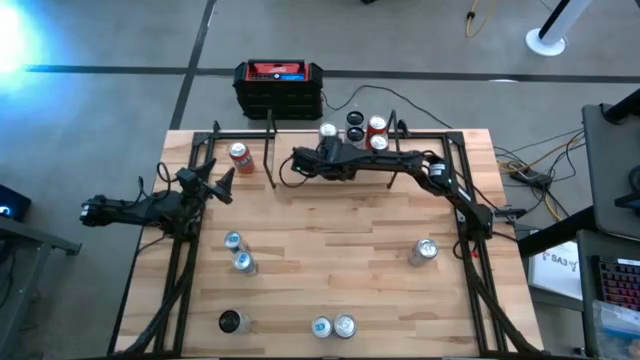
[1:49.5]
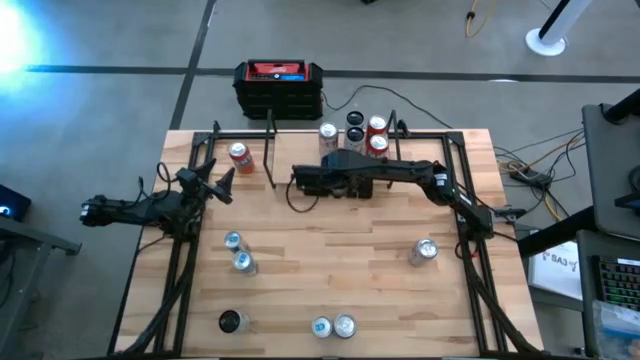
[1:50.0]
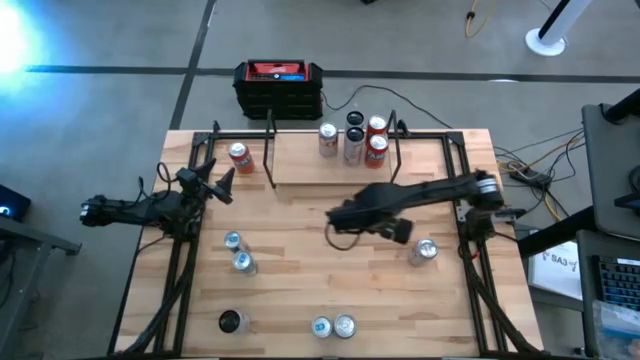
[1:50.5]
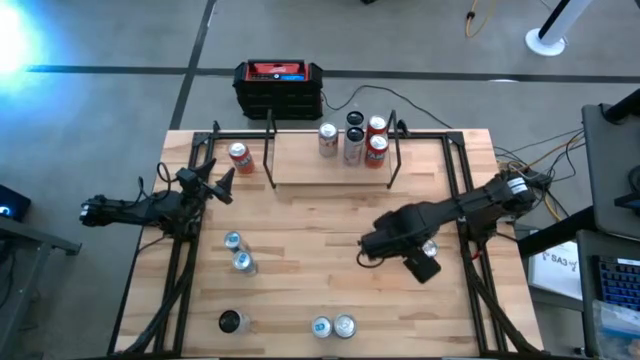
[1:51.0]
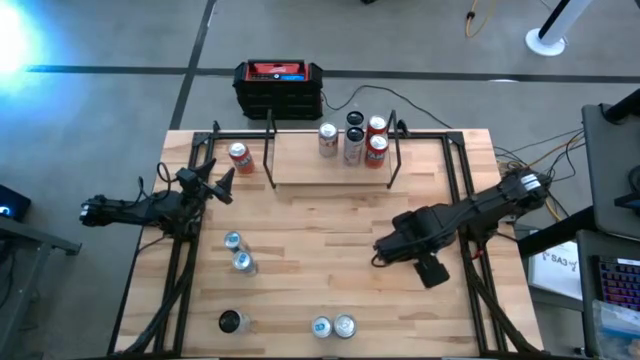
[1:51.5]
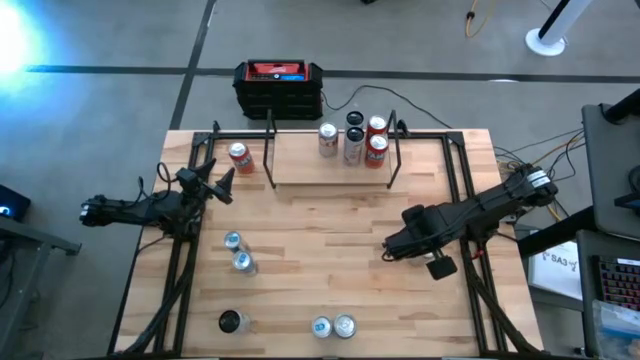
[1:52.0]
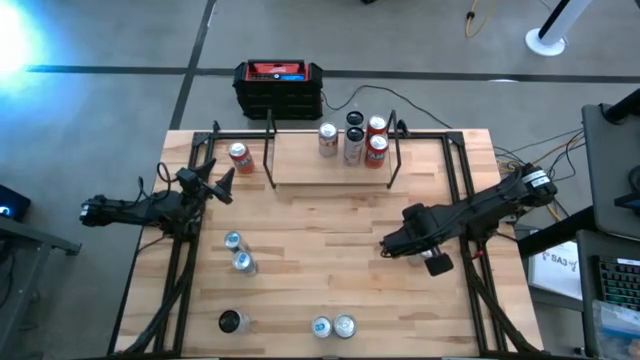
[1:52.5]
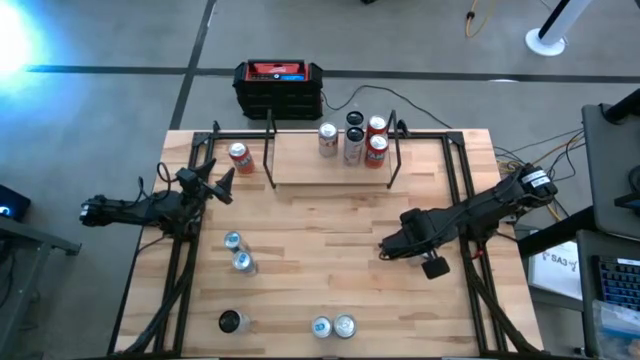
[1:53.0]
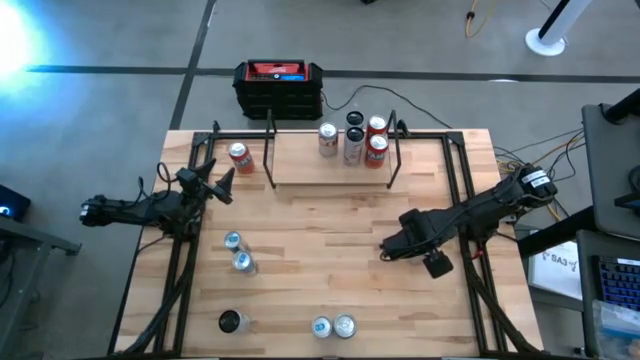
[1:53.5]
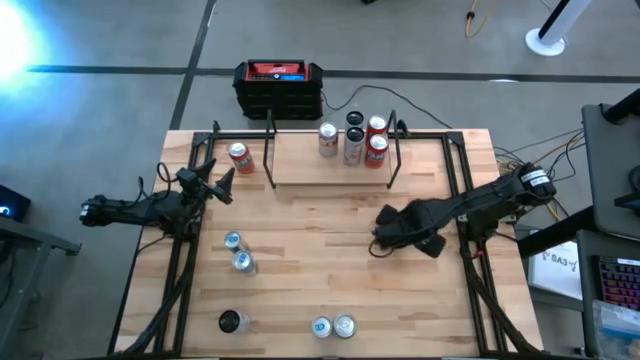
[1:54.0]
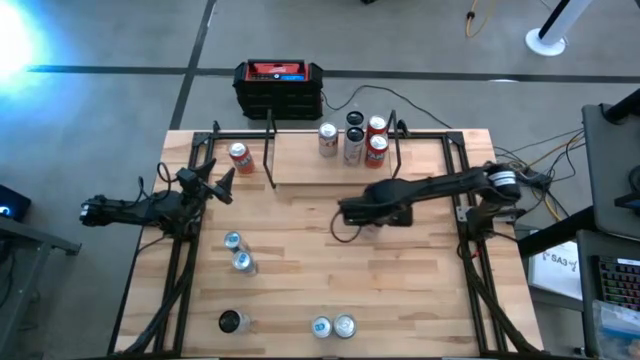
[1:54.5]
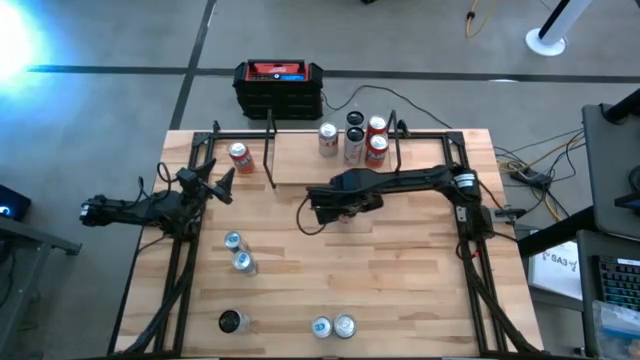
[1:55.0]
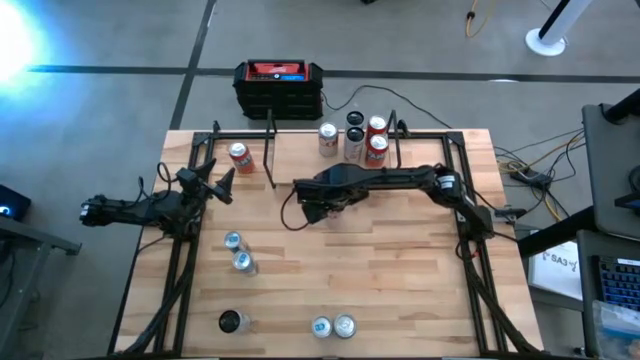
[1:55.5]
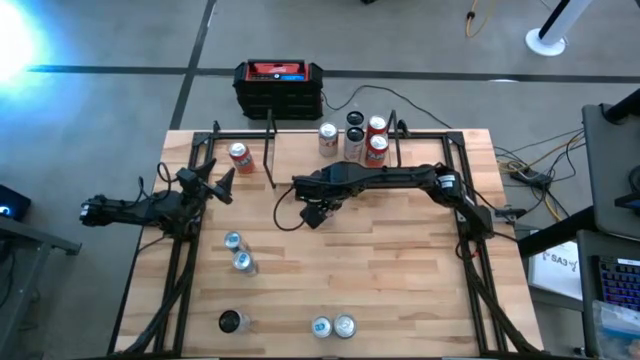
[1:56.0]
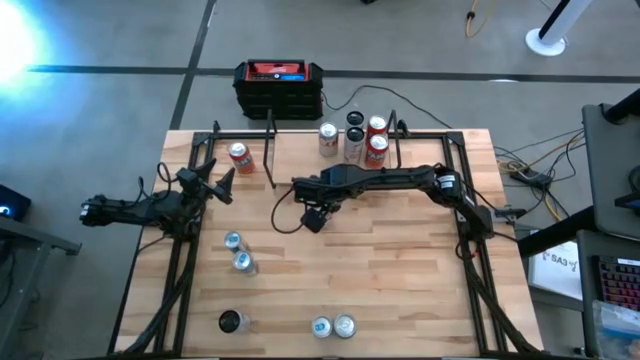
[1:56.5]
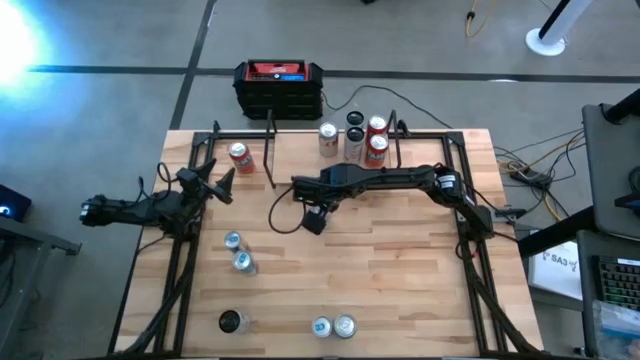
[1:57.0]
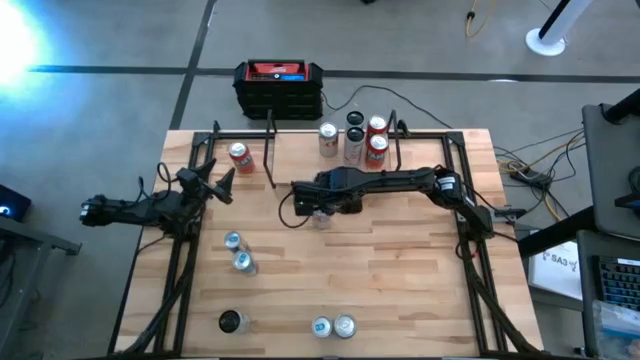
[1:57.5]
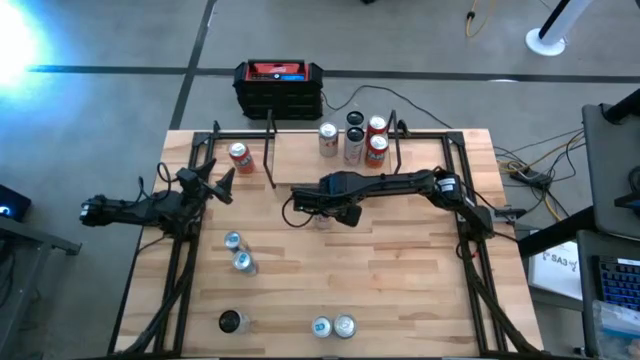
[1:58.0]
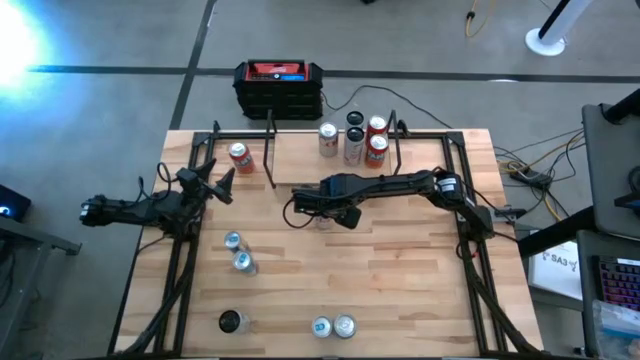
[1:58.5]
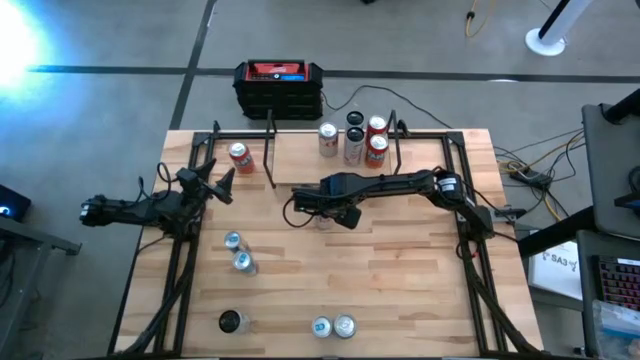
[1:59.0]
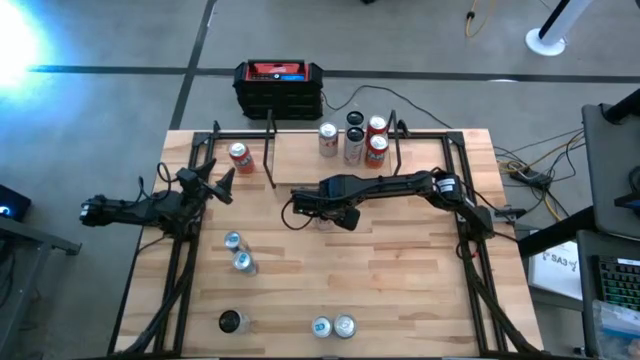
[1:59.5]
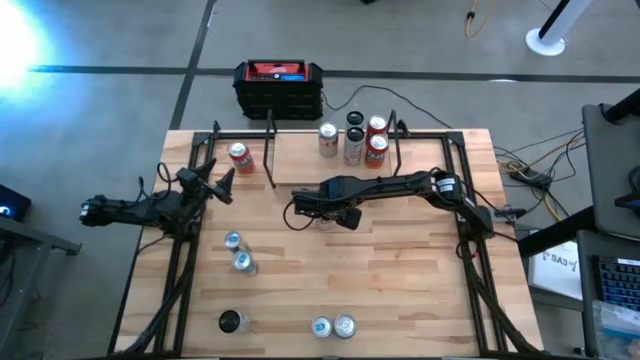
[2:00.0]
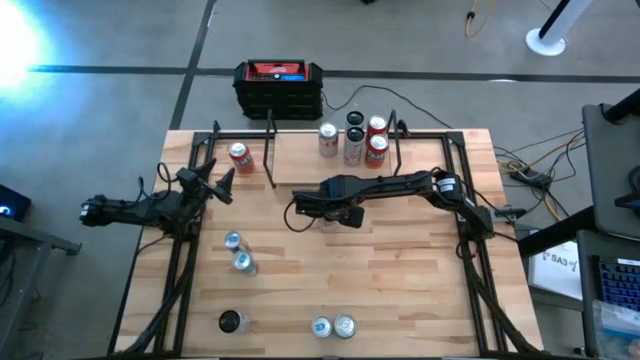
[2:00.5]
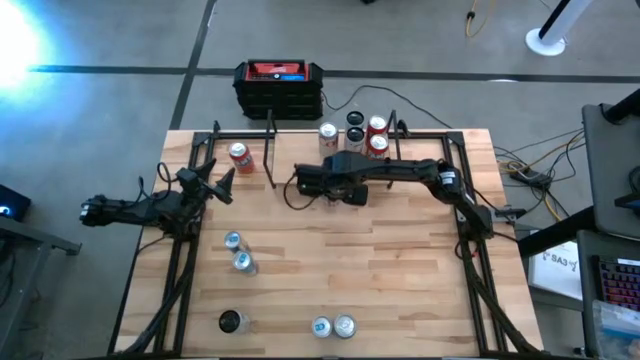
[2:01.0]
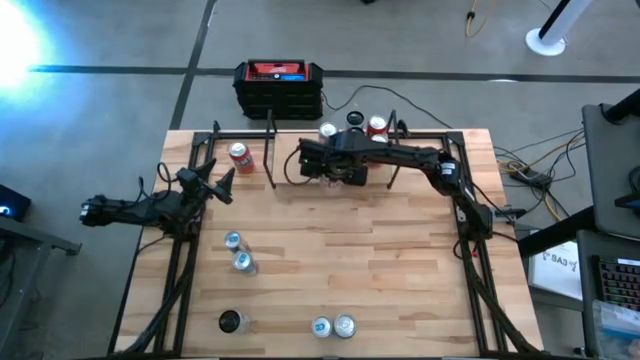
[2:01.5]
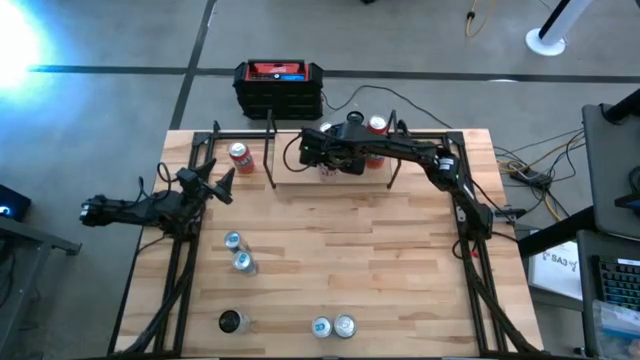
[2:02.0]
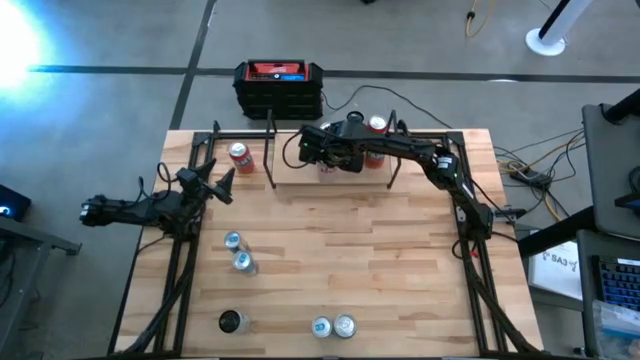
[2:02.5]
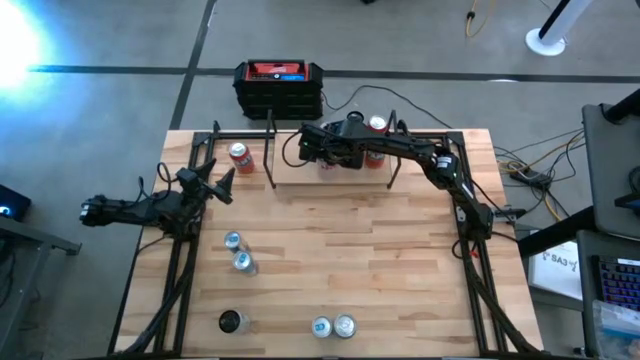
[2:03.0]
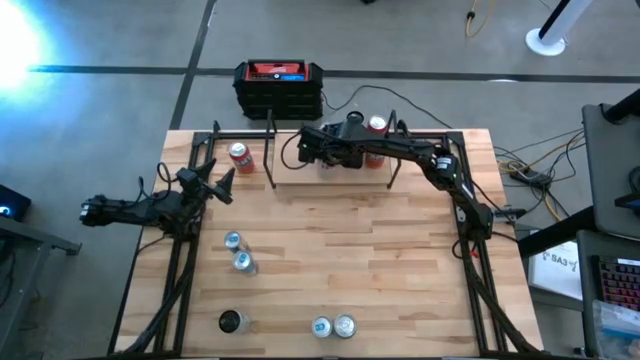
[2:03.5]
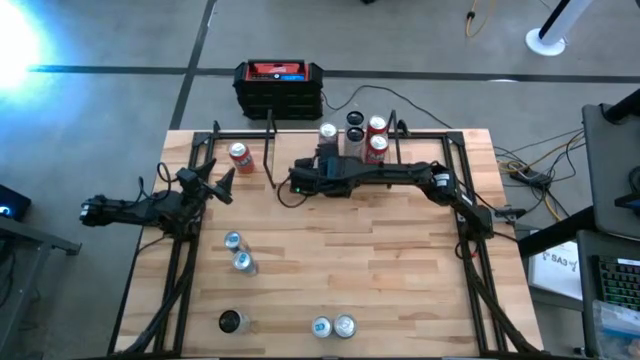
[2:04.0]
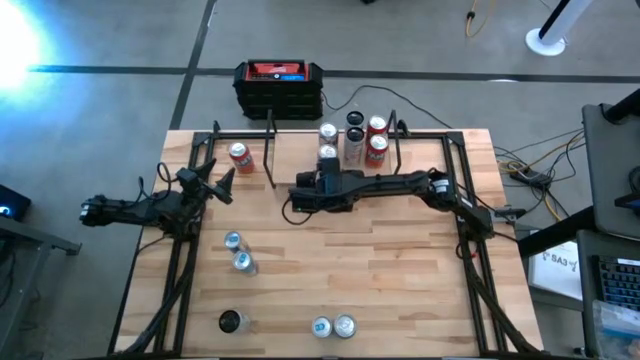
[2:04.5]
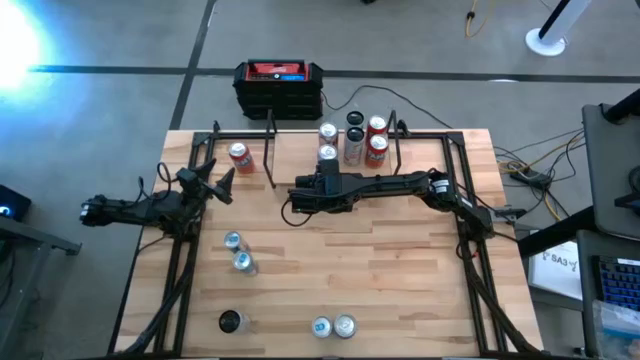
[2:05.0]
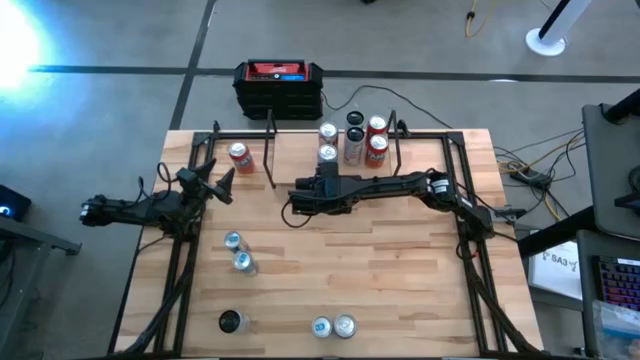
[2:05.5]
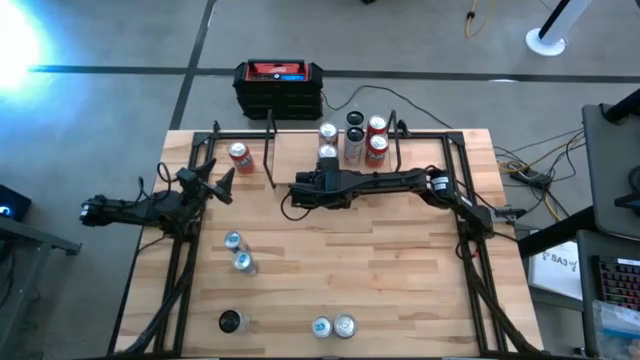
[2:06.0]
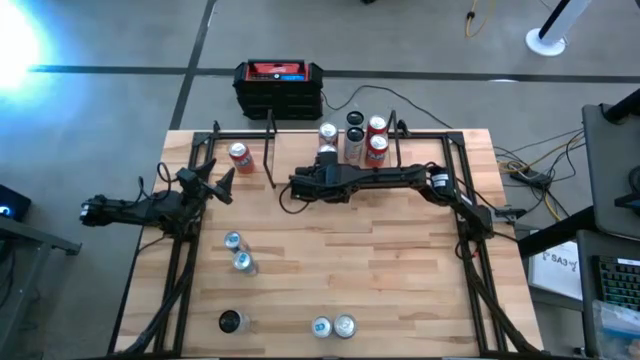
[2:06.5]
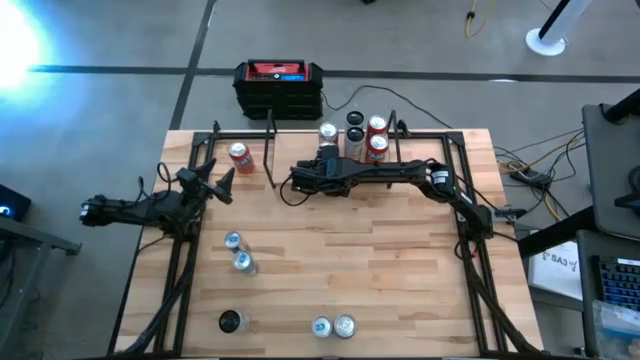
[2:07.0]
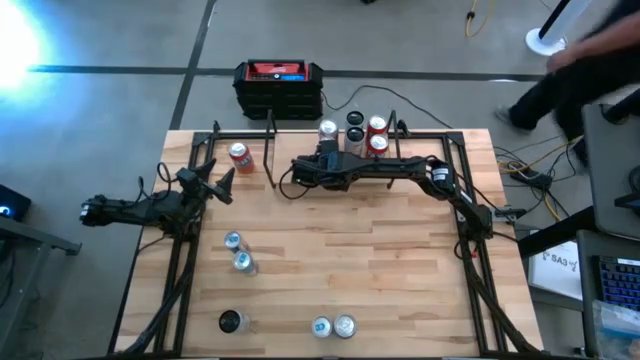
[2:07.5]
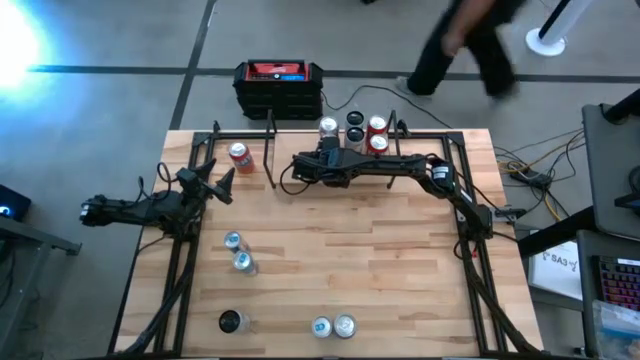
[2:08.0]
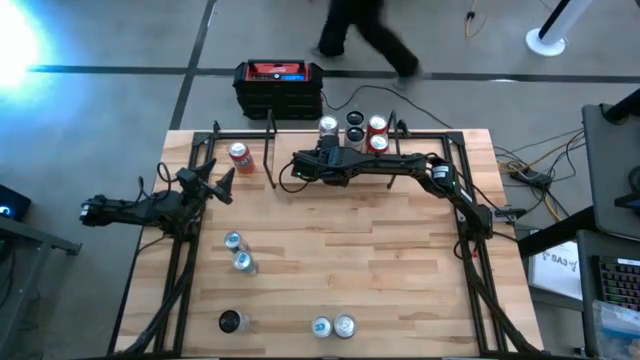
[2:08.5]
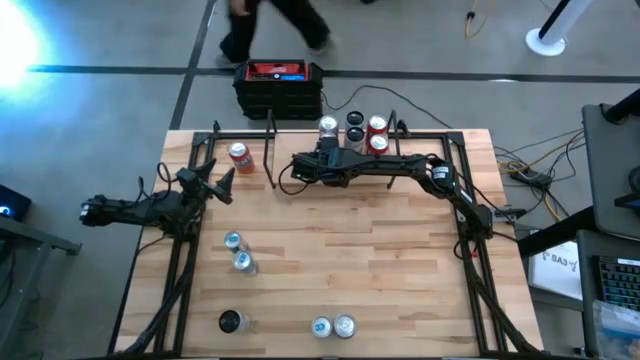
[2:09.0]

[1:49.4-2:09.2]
Task: Place canned beverage on shelf
Put the top silver soda can on the shelf aligned with the other silver soda can

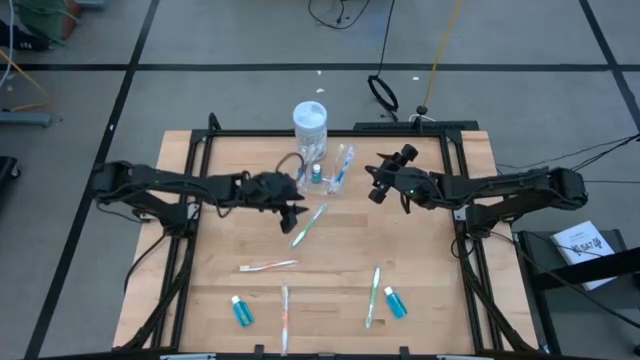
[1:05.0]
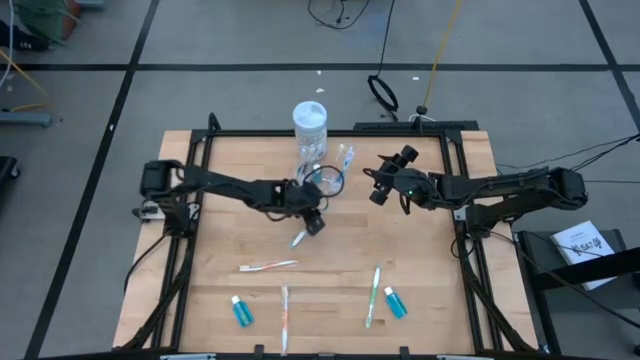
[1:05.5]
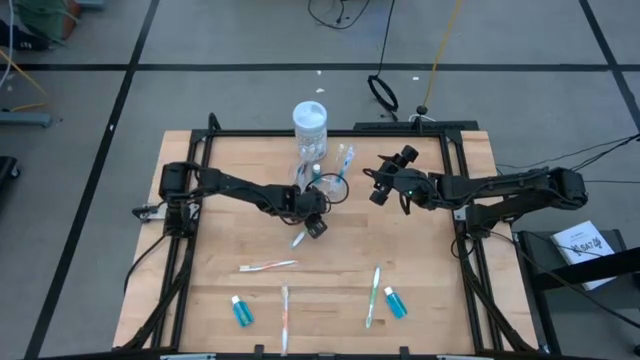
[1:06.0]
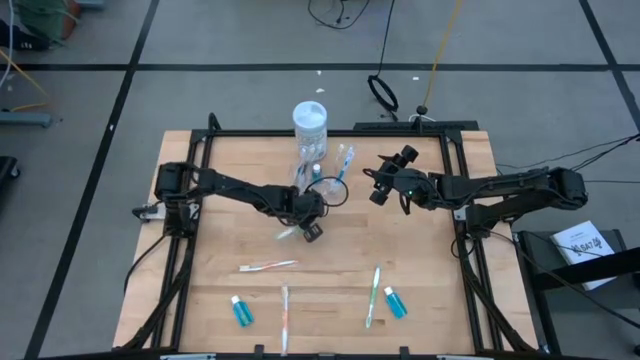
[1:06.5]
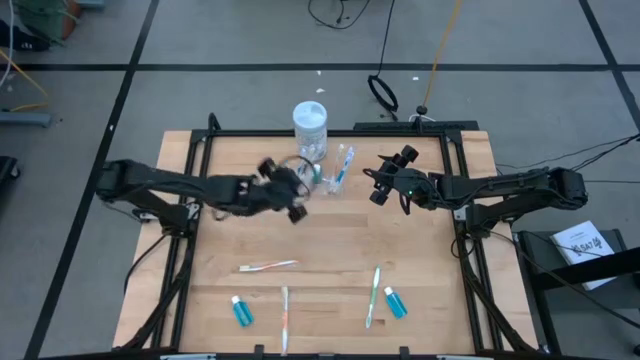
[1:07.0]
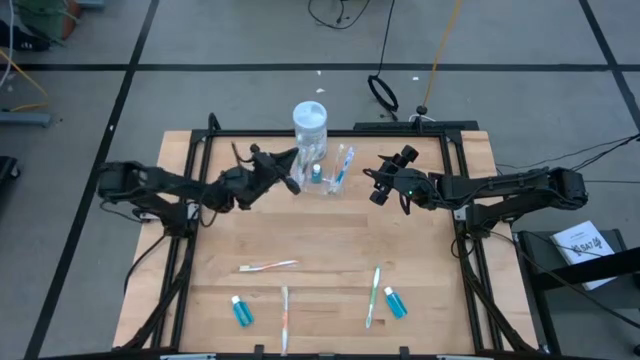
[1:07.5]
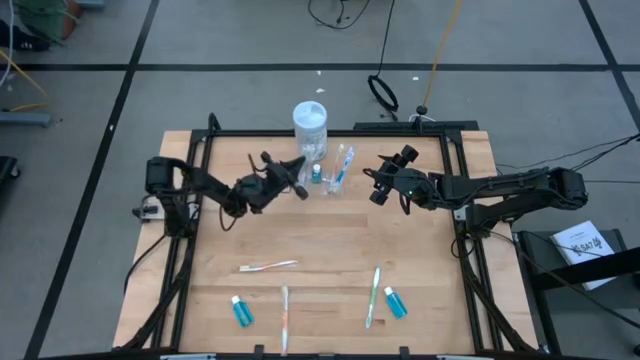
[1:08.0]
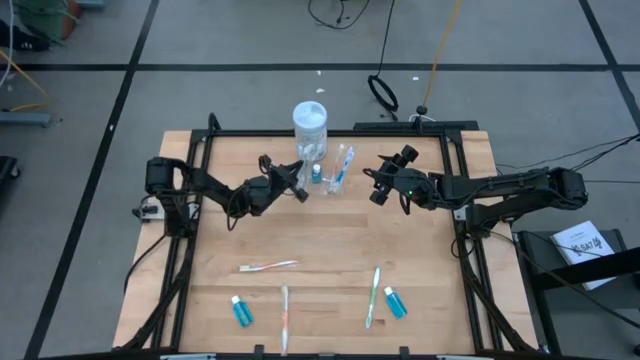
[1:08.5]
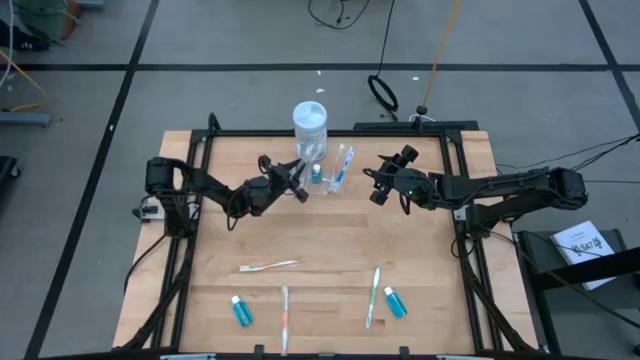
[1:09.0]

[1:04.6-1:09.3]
Task: Pick & Place toothbrushing station
Put the green toothbrush into the transparent organizer
